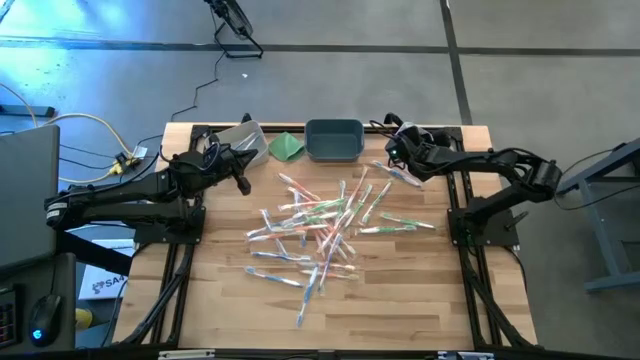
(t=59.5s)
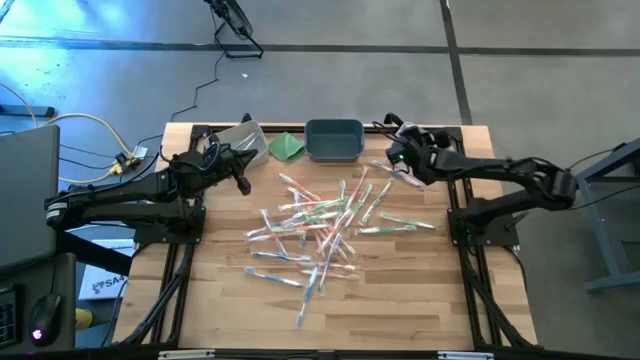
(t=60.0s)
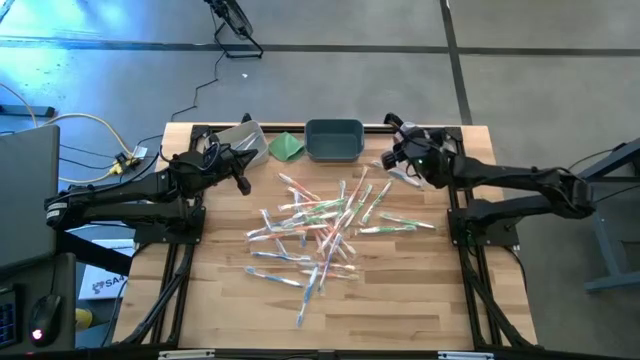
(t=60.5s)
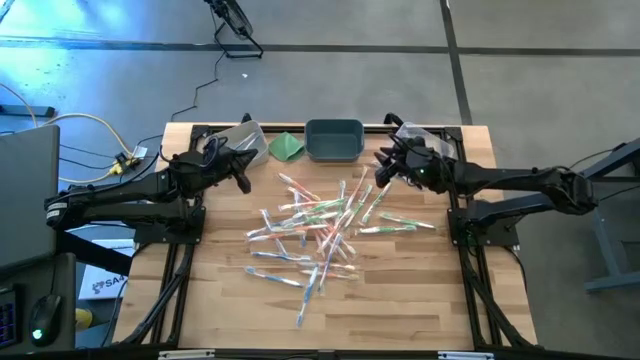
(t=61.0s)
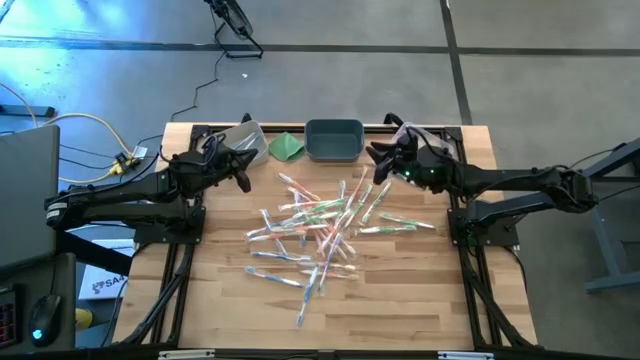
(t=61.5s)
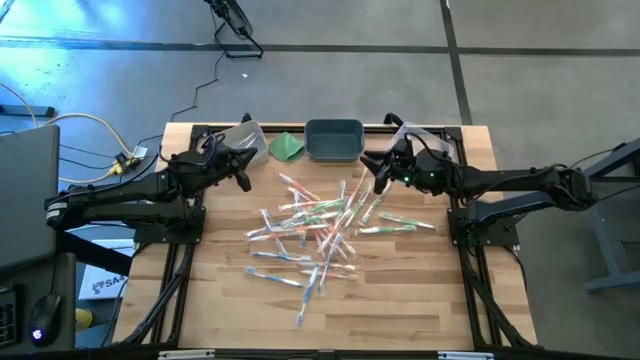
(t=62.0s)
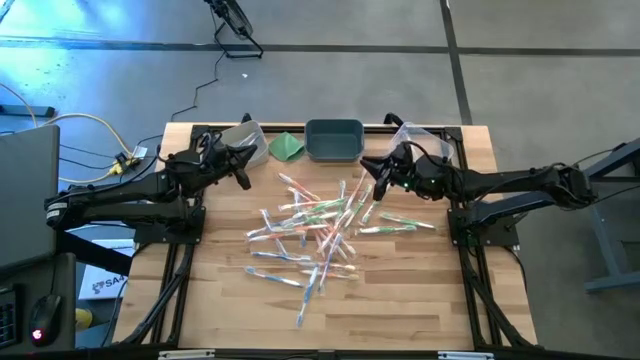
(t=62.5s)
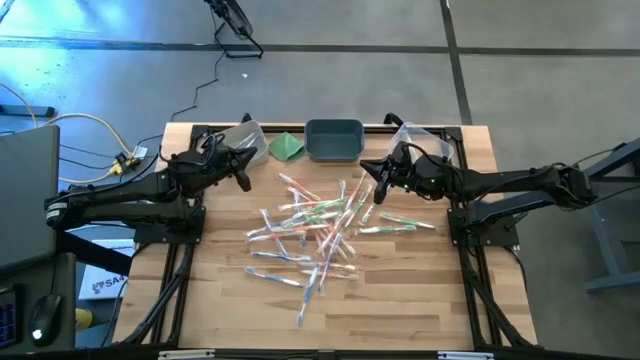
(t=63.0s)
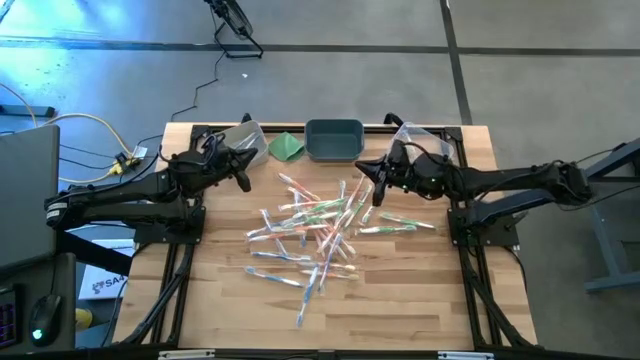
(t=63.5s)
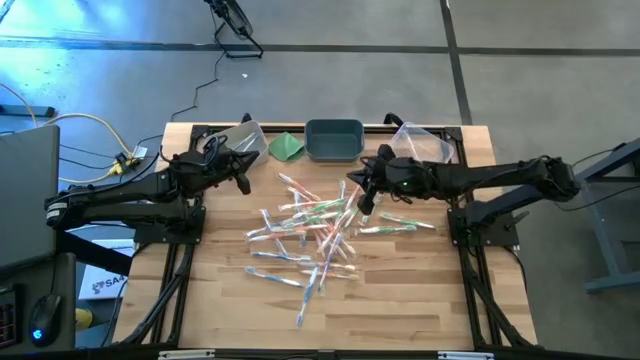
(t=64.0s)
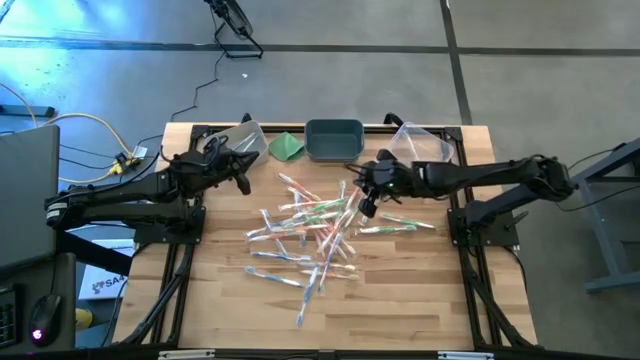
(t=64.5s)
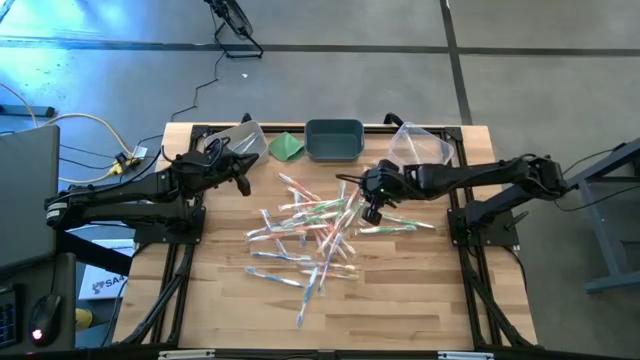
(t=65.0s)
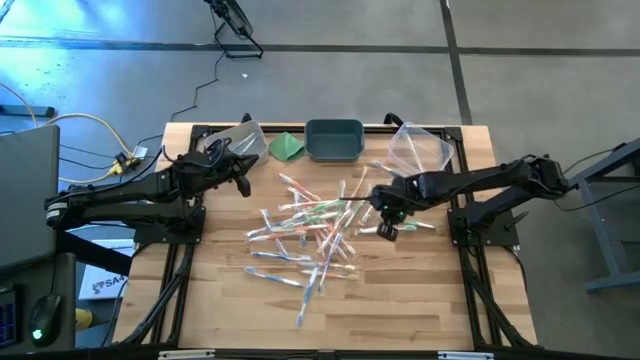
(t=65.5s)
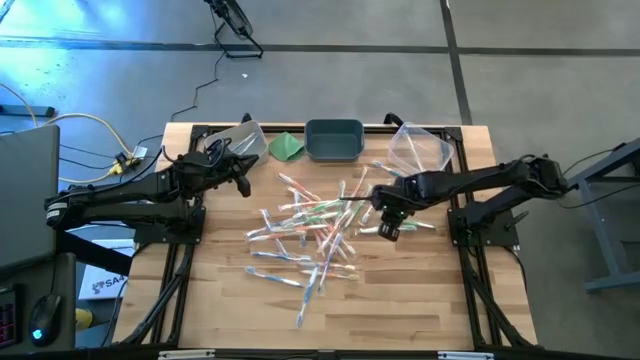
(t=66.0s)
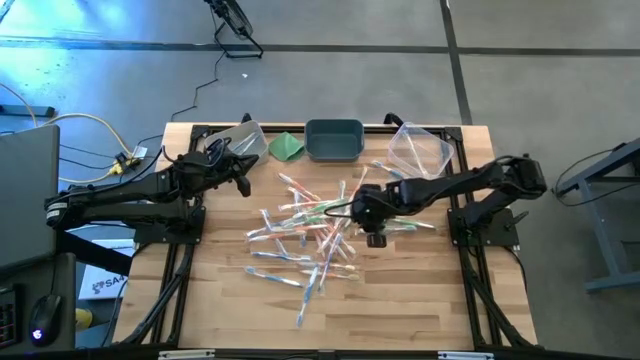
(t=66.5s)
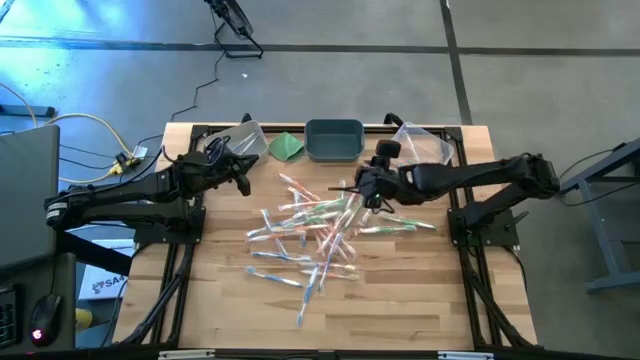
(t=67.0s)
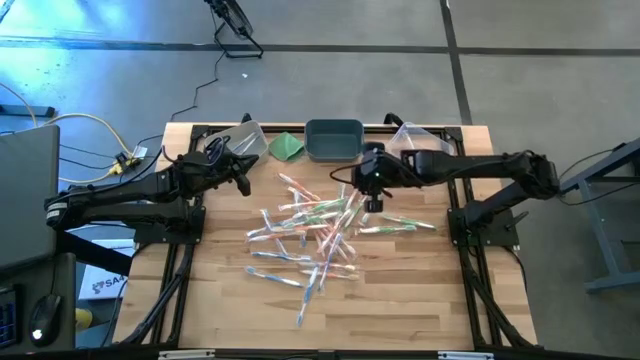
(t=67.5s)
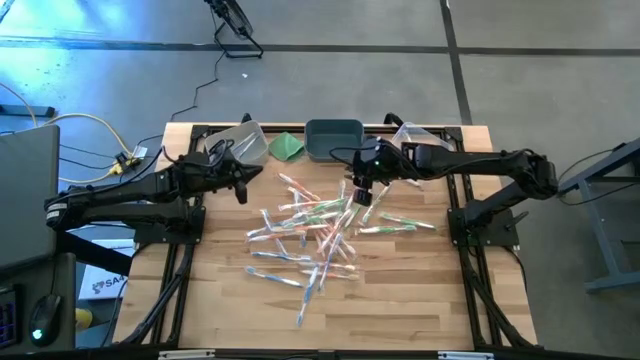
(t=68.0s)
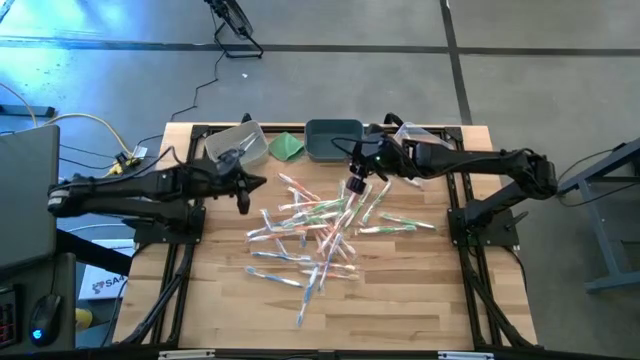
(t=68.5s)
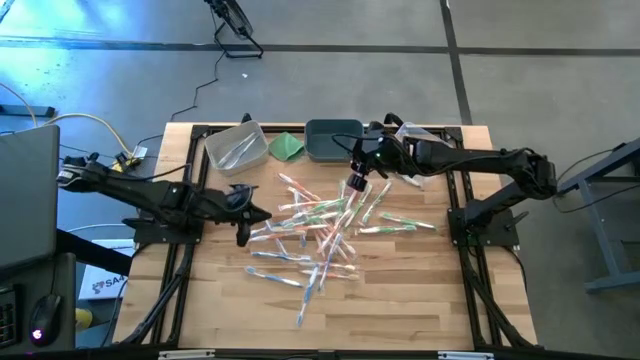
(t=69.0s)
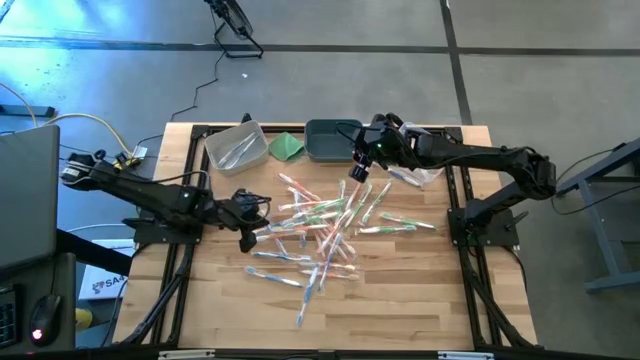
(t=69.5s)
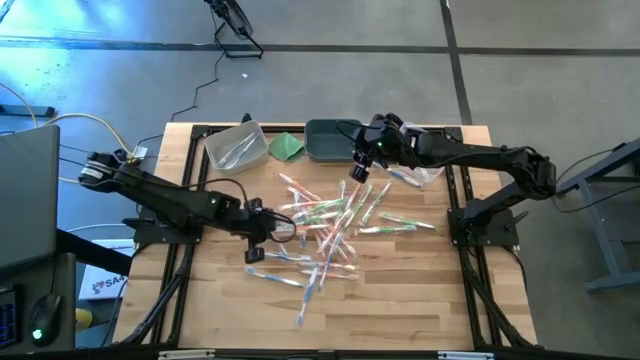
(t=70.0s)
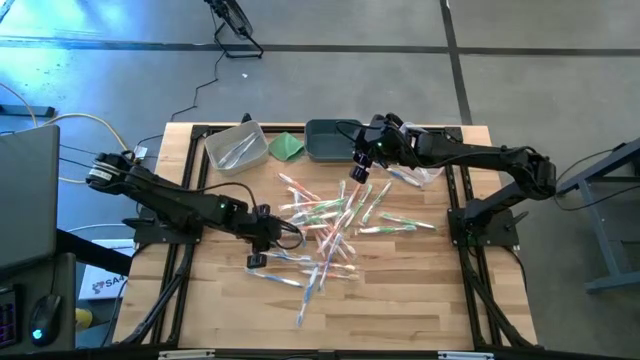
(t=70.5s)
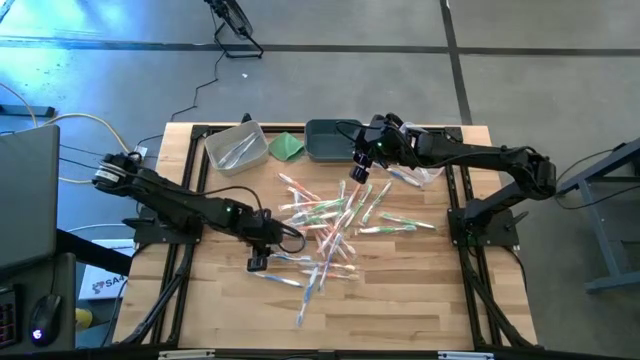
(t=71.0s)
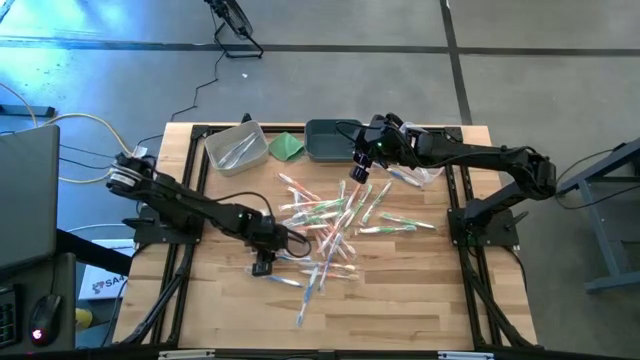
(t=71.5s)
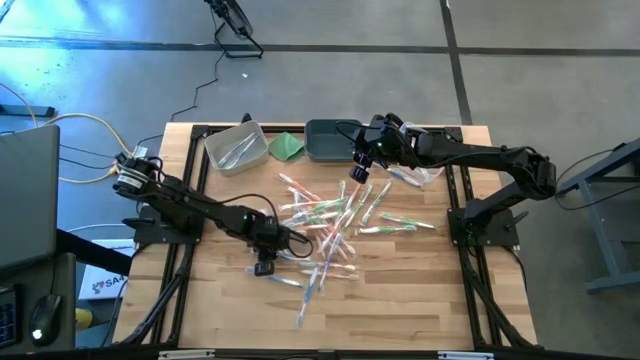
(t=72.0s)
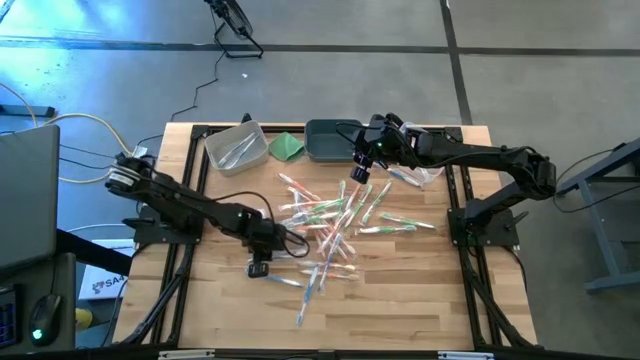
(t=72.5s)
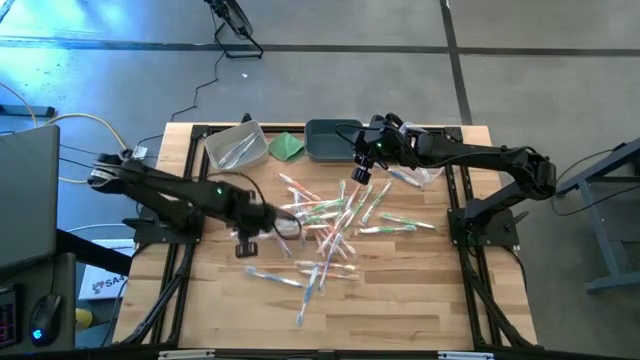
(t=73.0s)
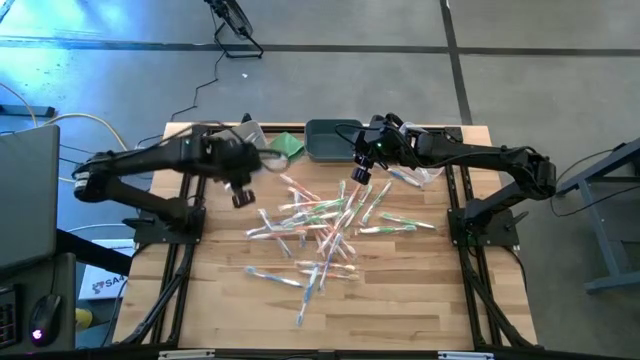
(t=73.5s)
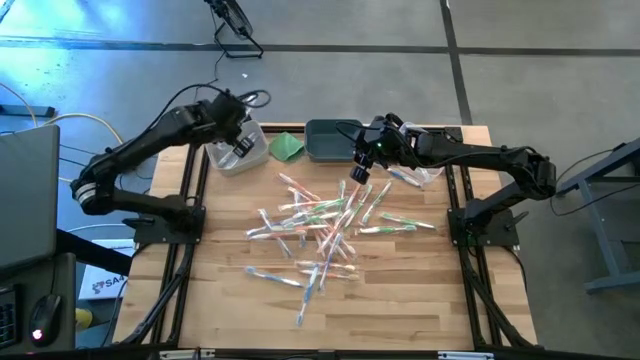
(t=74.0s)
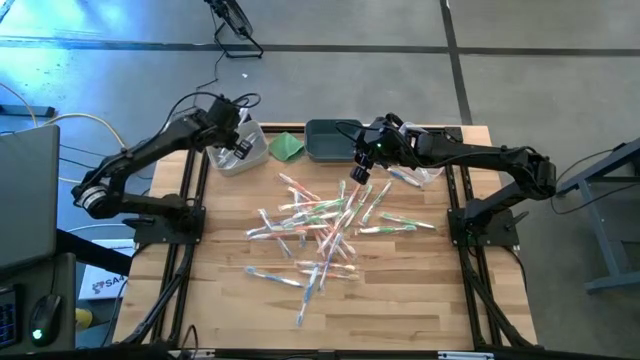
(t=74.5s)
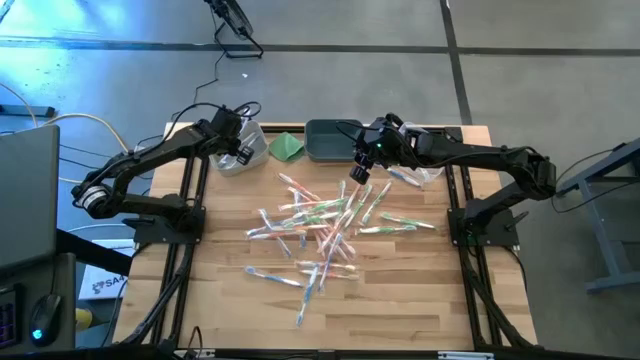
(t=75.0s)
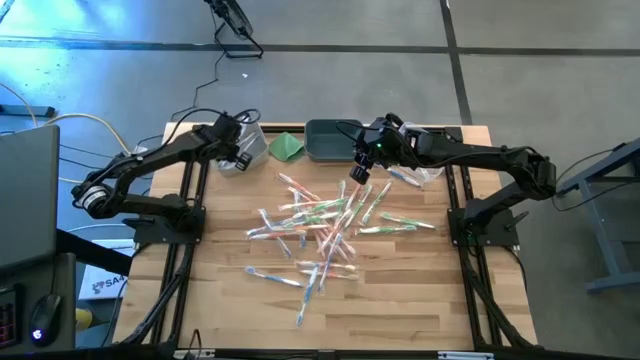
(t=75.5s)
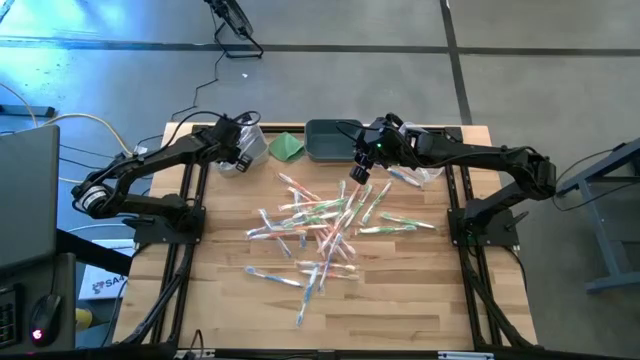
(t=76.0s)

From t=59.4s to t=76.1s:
Task: Pick & Place Toothbrushes
Put the blue toothbrush into the gray bin
